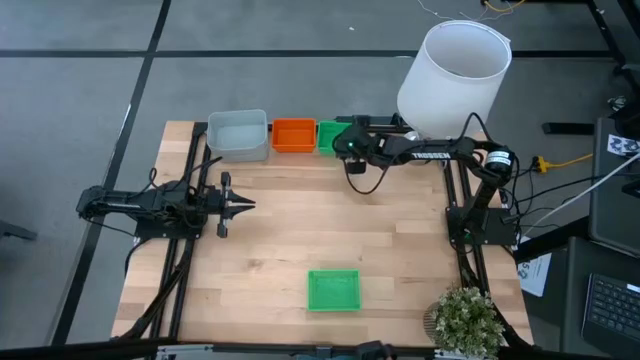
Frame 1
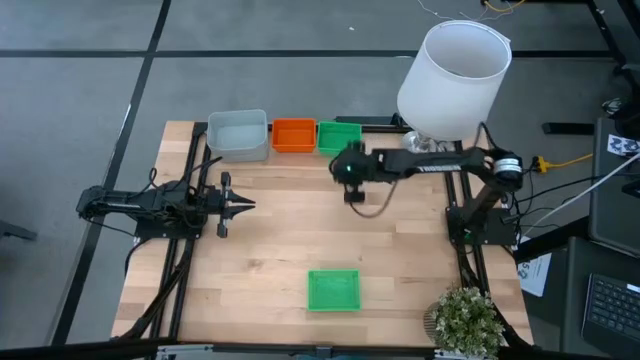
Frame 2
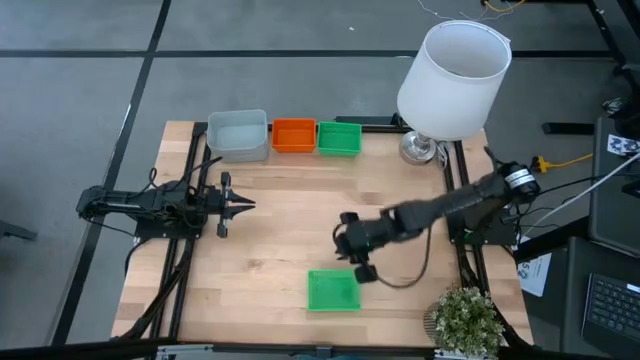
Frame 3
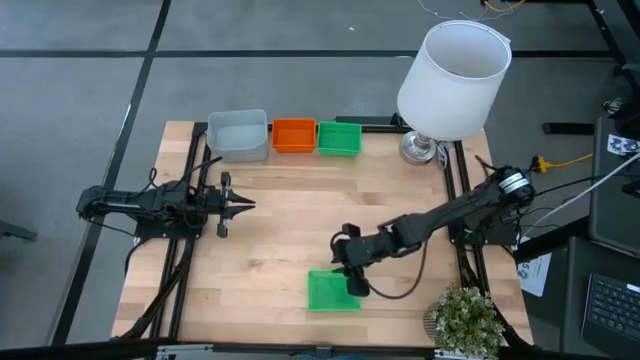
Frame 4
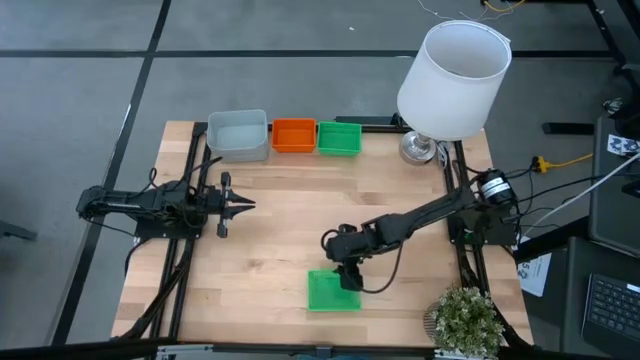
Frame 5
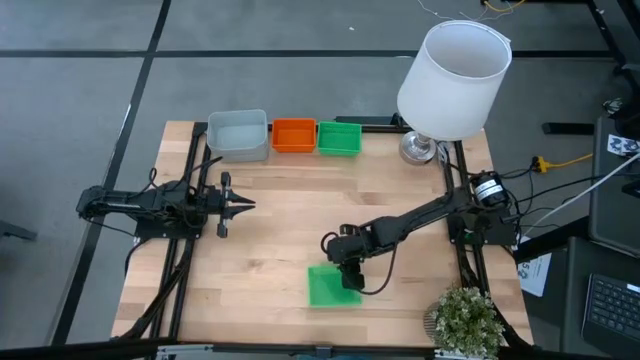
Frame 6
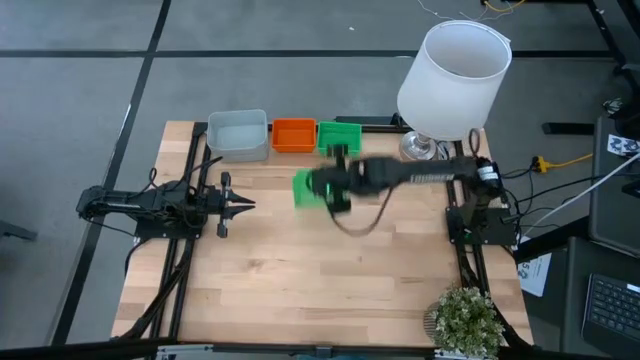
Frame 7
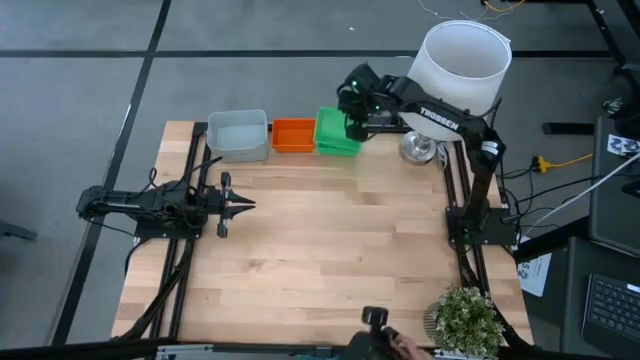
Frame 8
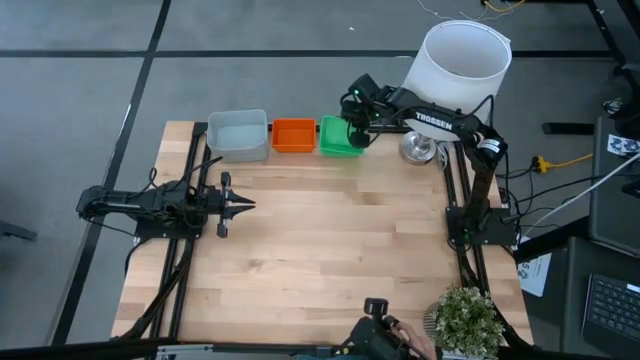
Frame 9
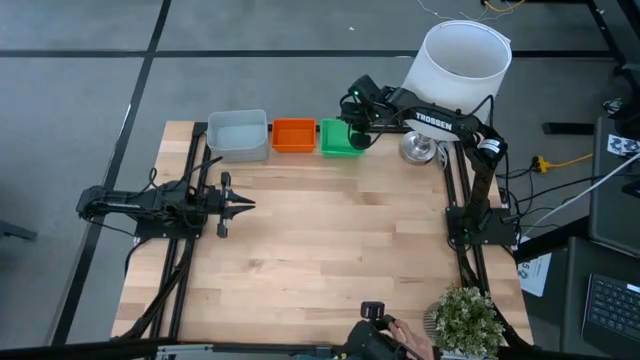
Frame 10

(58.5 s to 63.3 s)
Stack the bottom green bin on the top green bin

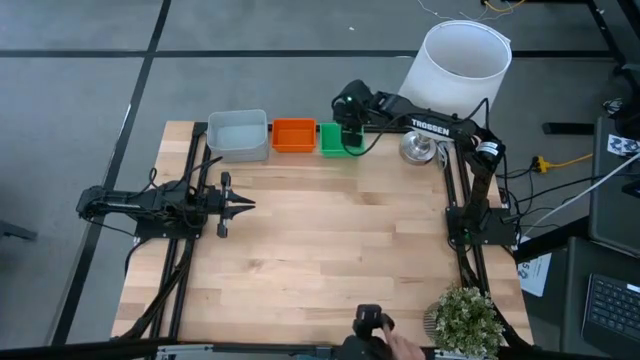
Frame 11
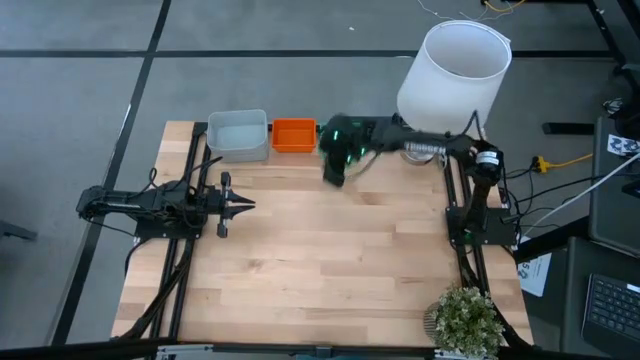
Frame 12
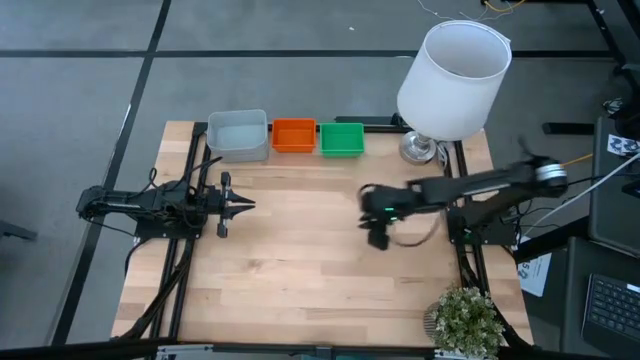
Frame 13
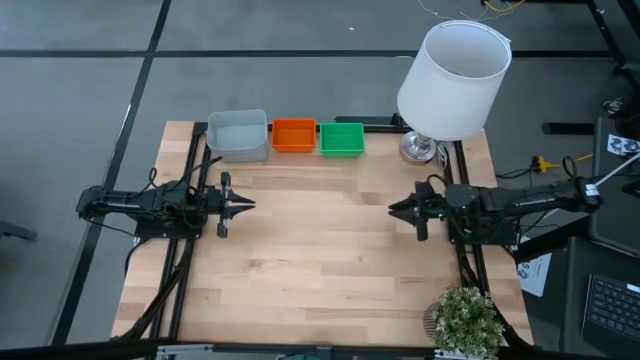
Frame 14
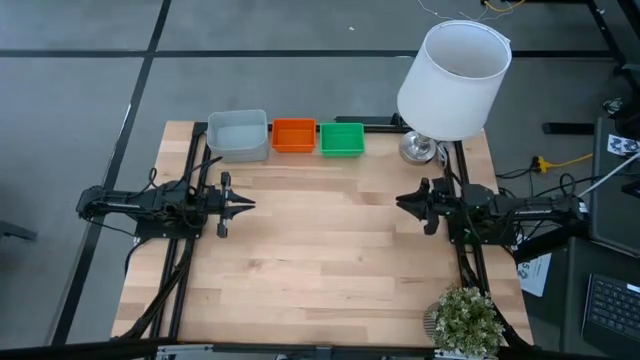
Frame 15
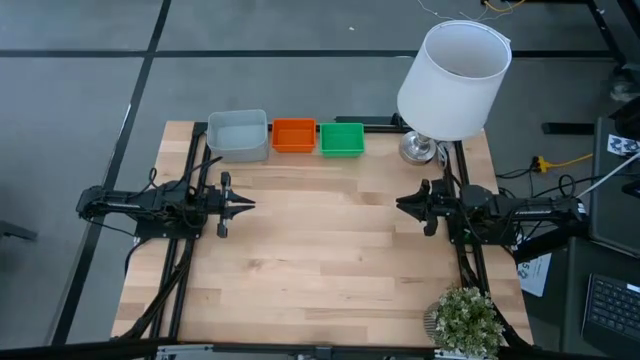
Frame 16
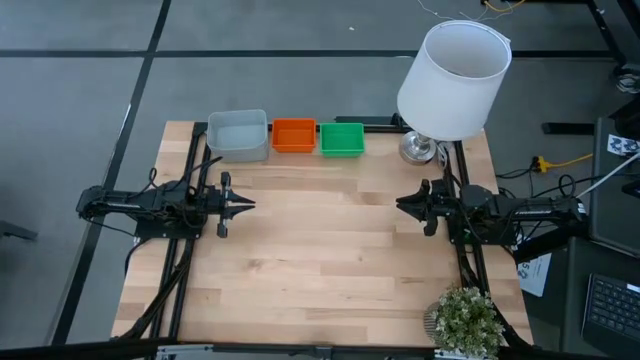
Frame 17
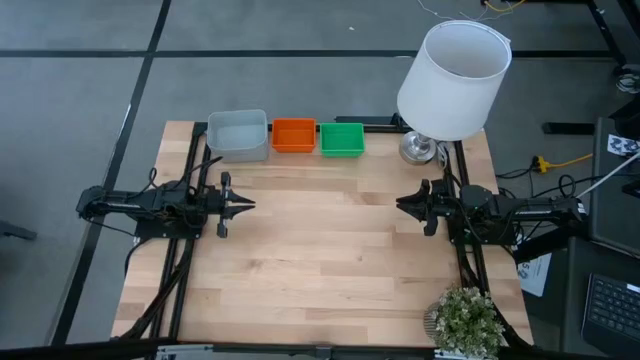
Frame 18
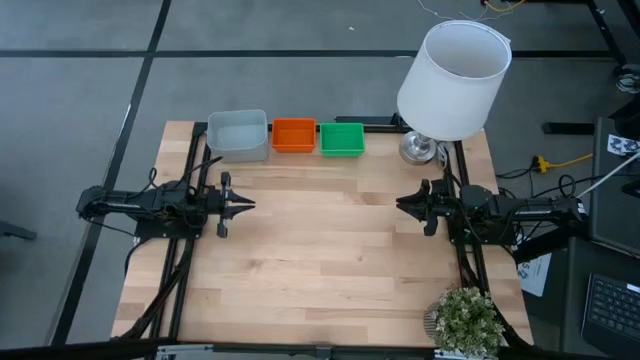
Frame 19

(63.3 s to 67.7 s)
Return to Home Position
